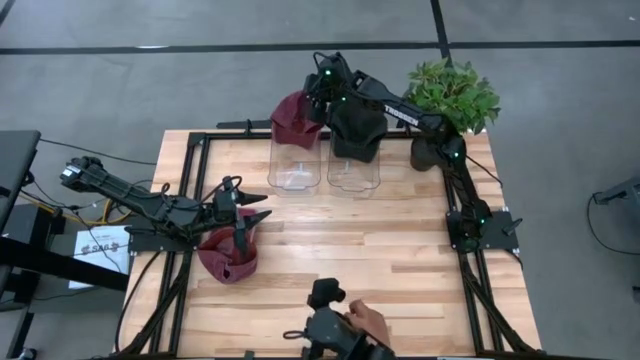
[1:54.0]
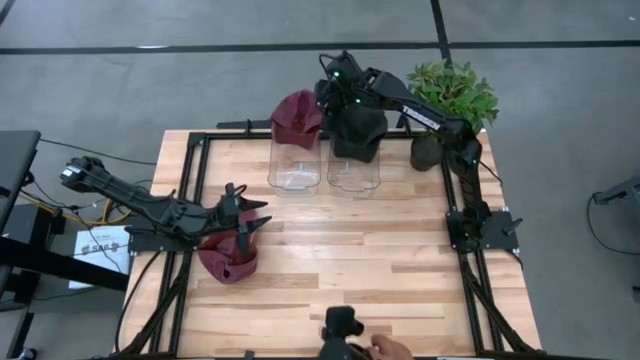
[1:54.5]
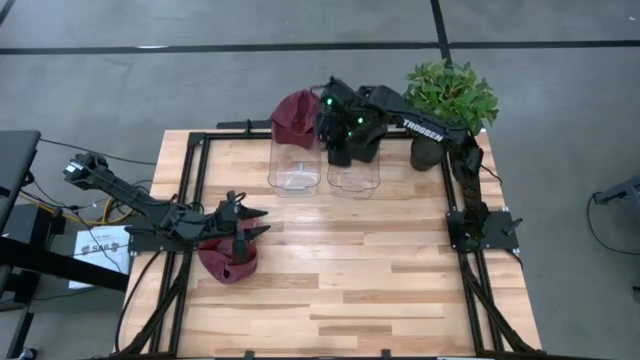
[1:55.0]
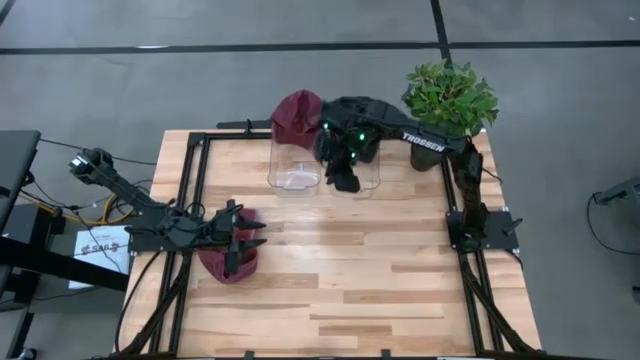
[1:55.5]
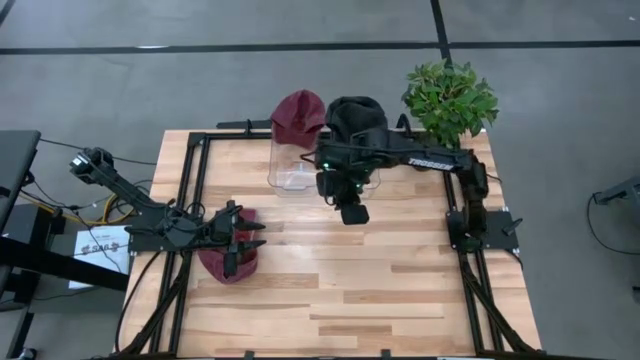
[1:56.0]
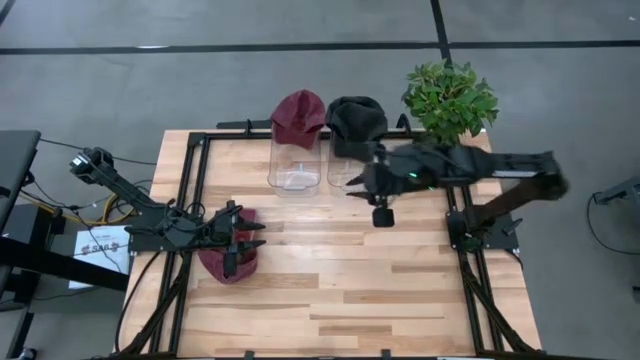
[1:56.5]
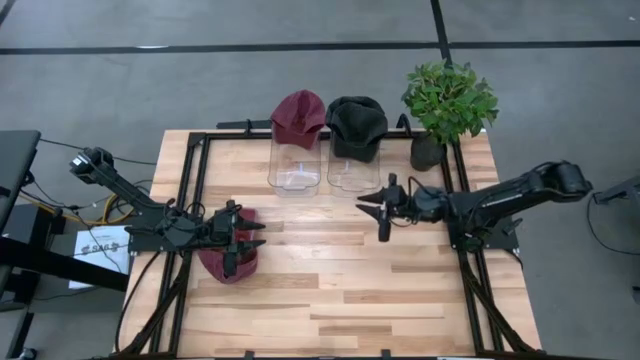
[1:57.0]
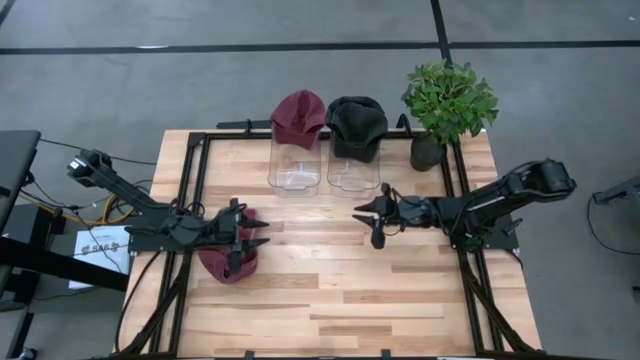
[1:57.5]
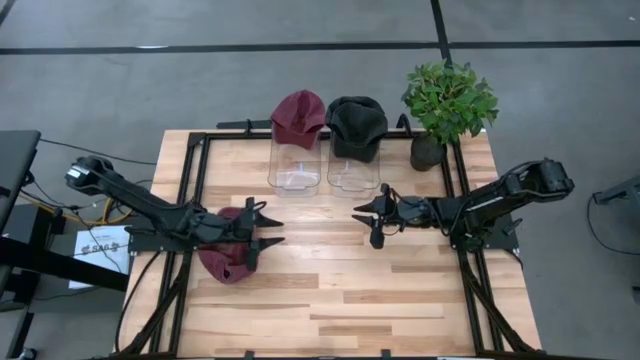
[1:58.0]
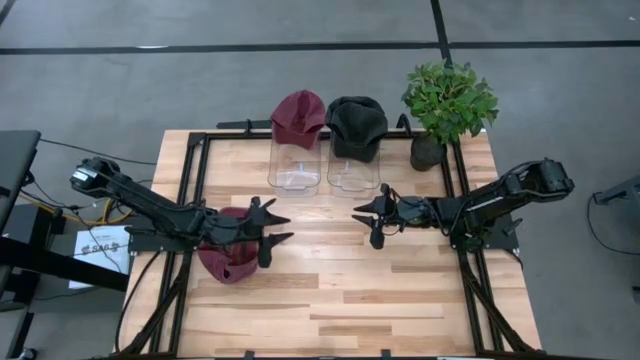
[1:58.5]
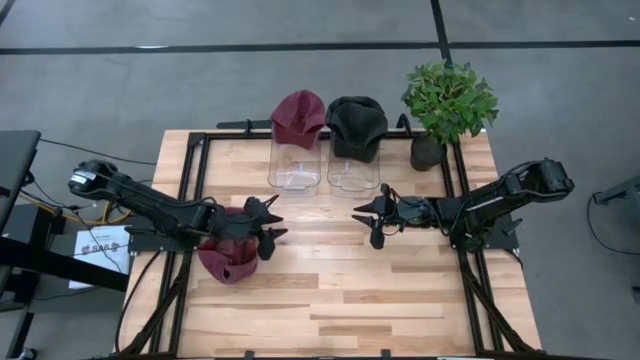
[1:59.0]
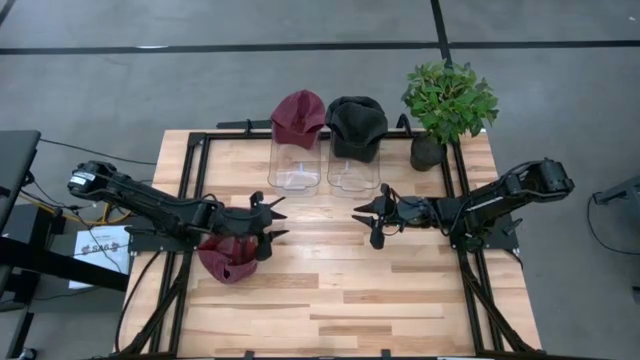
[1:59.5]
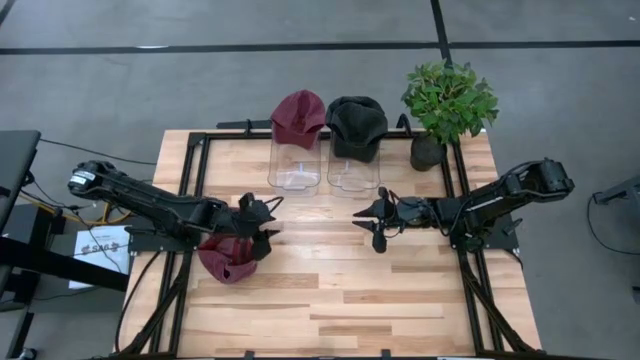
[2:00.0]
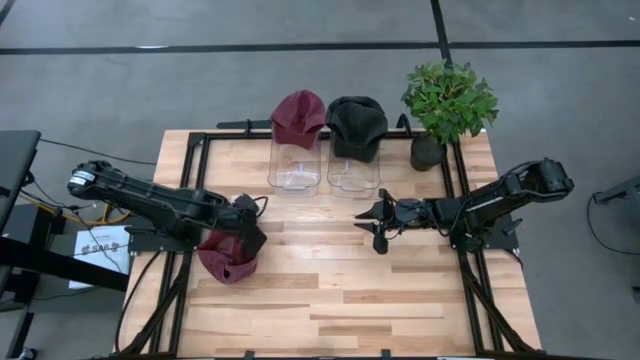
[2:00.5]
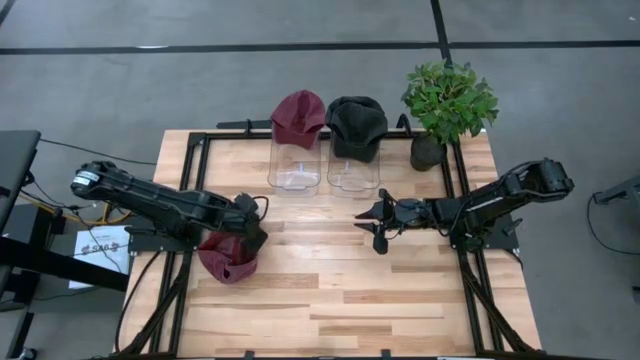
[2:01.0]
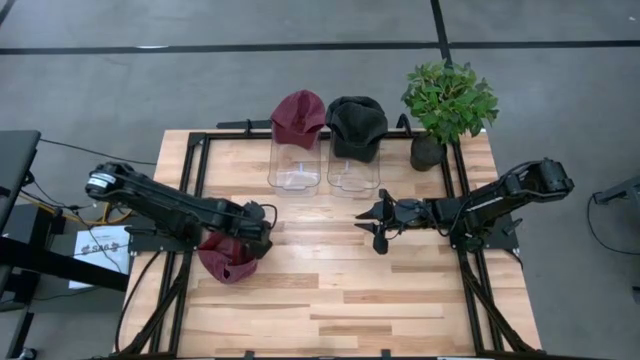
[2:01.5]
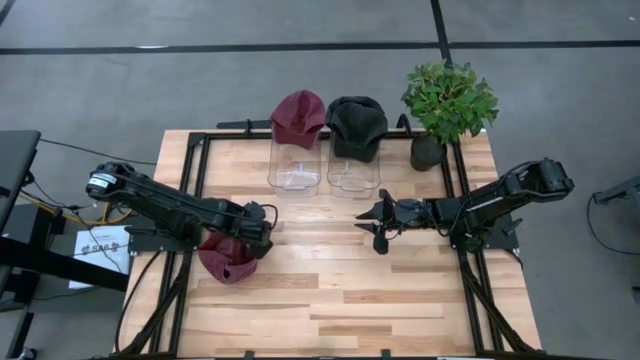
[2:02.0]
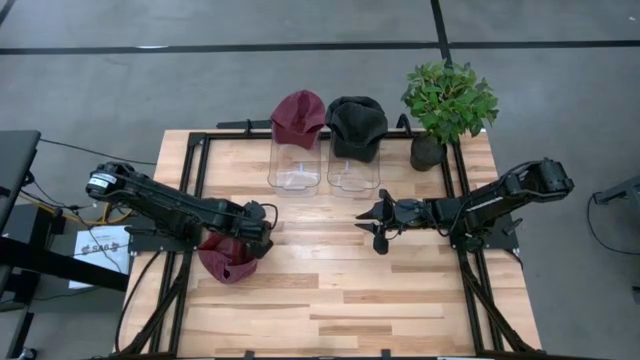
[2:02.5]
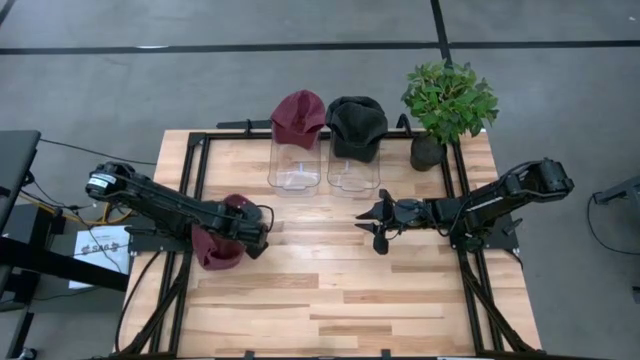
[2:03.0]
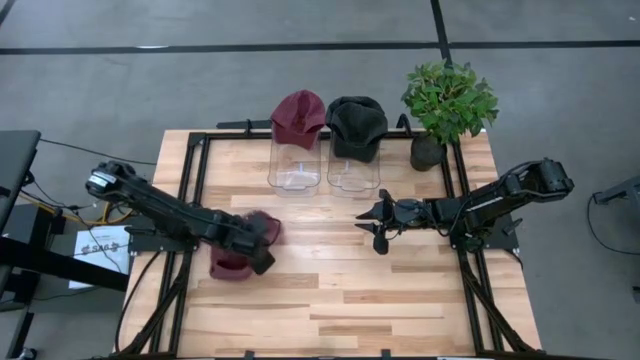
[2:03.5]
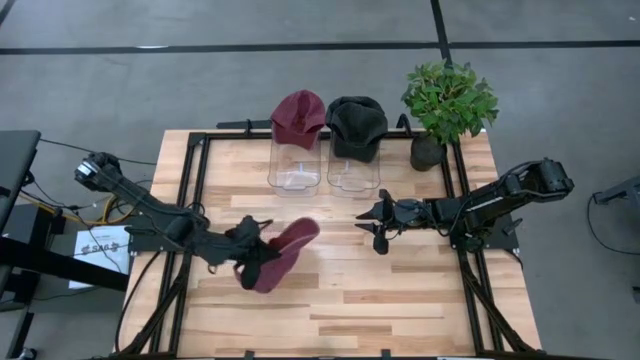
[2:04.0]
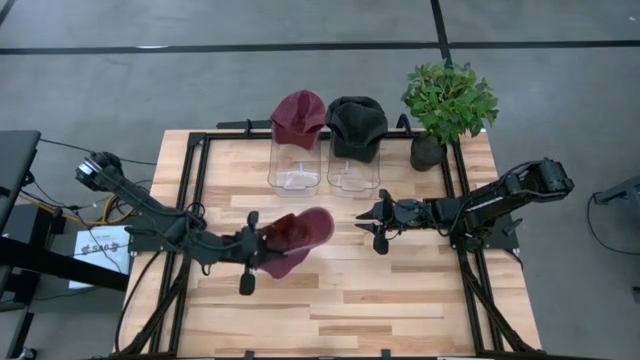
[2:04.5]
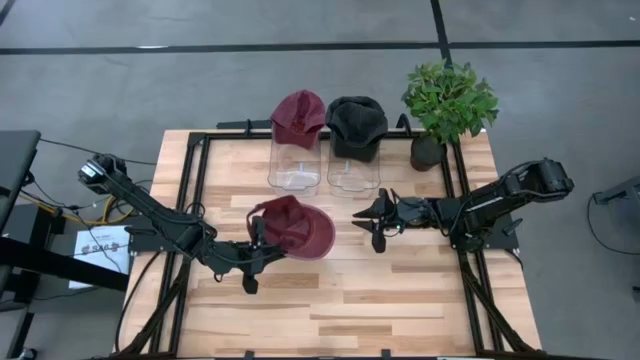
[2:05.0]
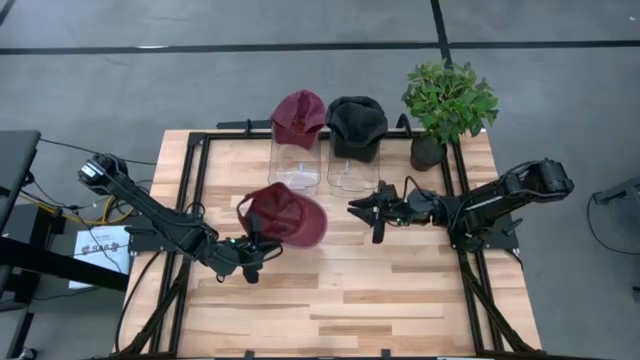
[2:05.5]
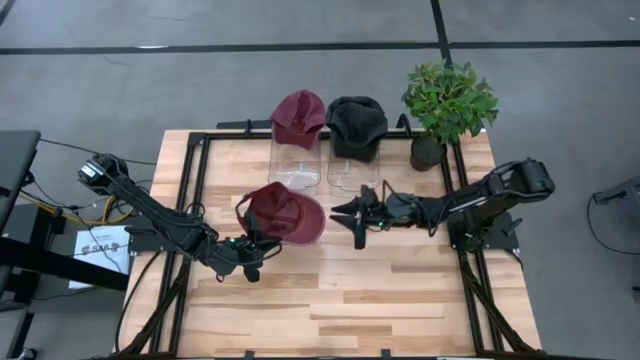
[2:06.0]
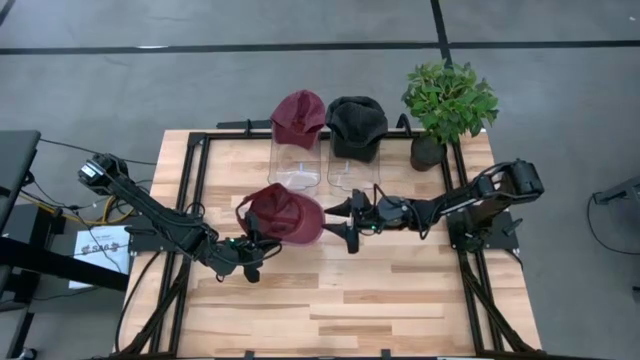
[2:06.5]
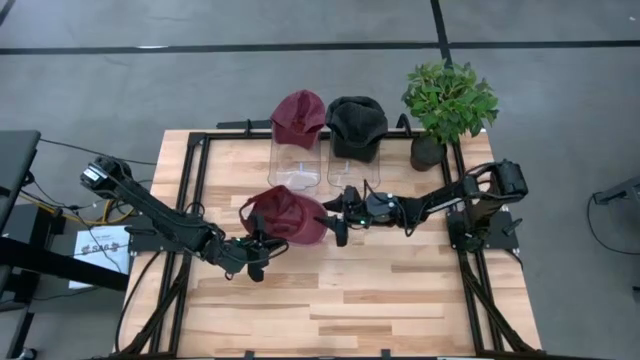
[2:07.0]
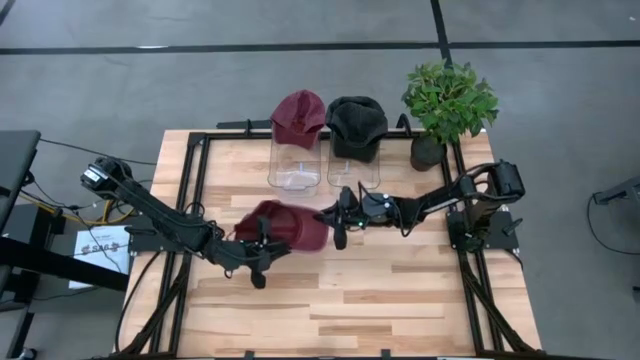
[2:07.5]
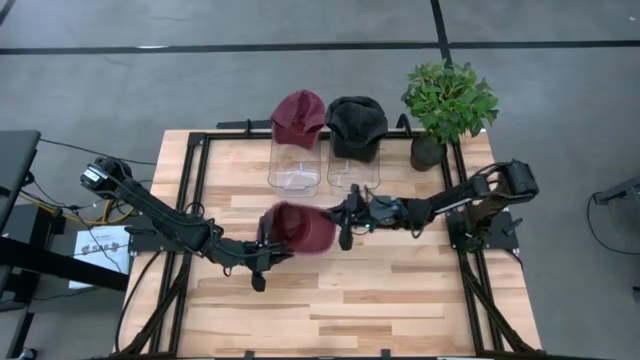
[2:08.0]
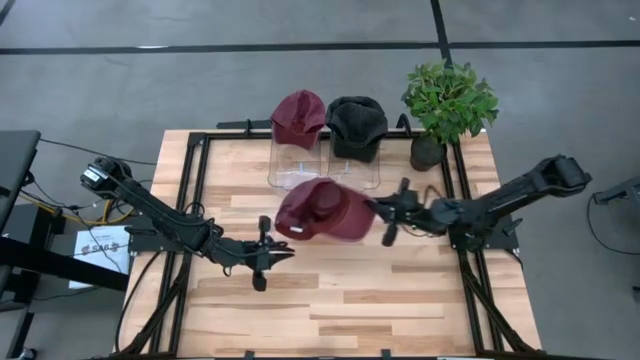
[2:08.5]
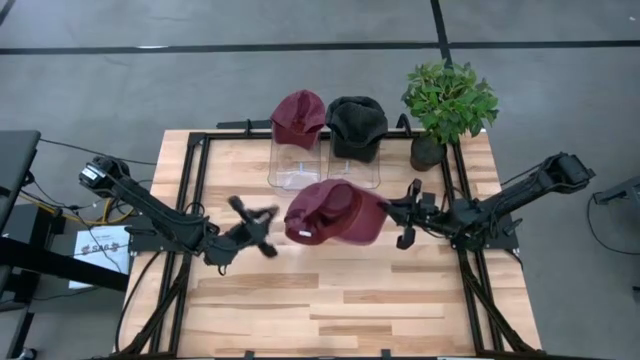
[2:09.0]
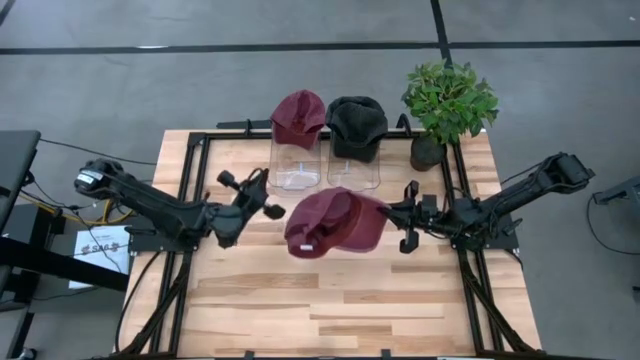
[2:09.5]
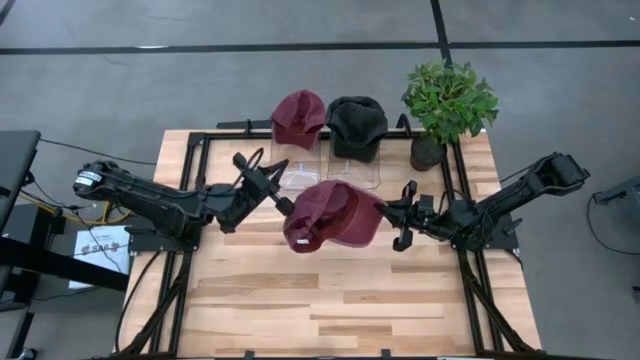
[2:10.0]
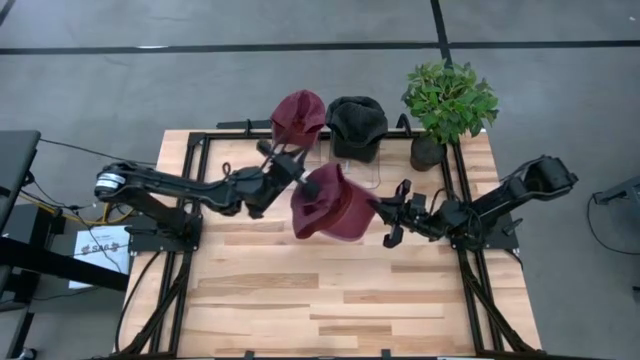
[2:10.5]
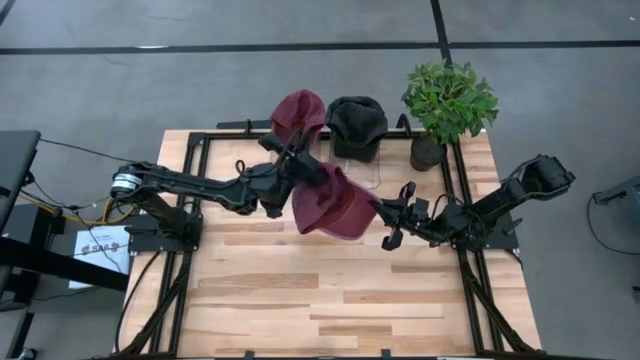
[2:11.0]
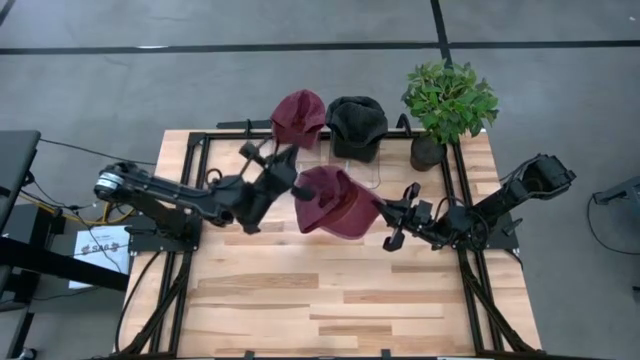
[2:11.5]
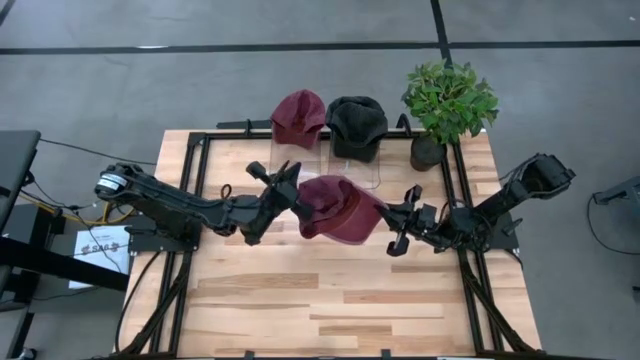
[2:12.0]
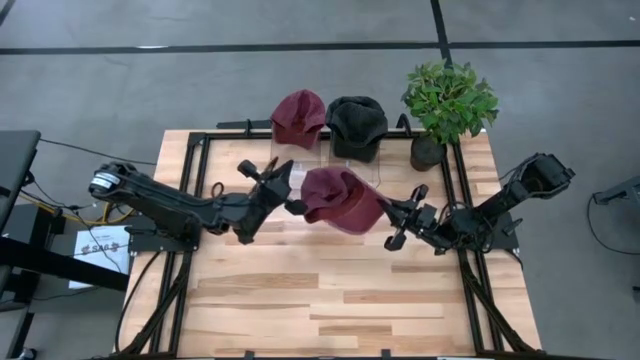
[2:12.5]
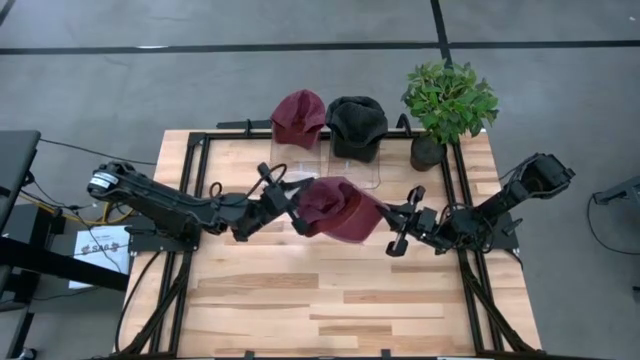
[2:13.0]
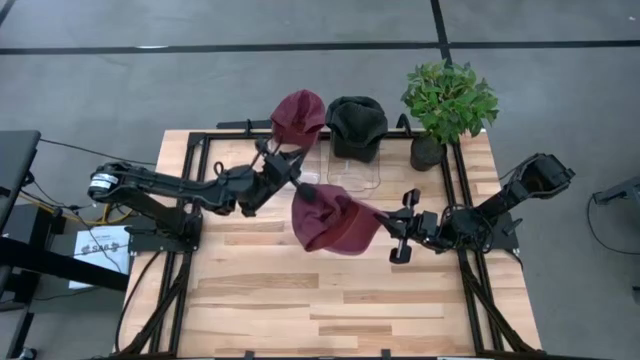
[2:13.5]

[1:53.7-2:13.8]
Task: Pick & Place hat
Put the red cap into the left transparent bin
